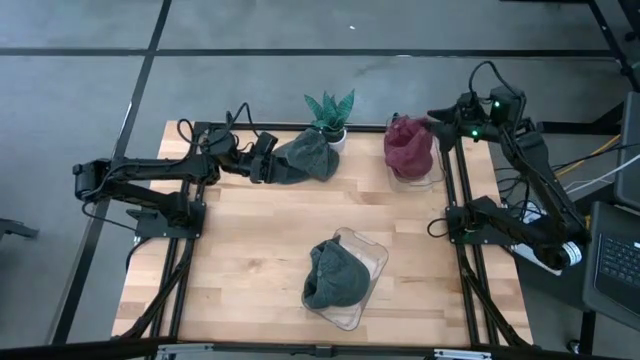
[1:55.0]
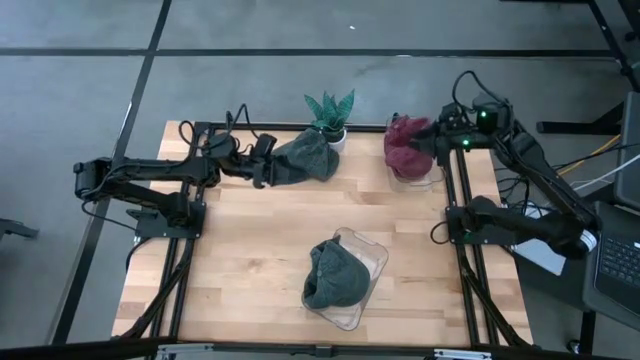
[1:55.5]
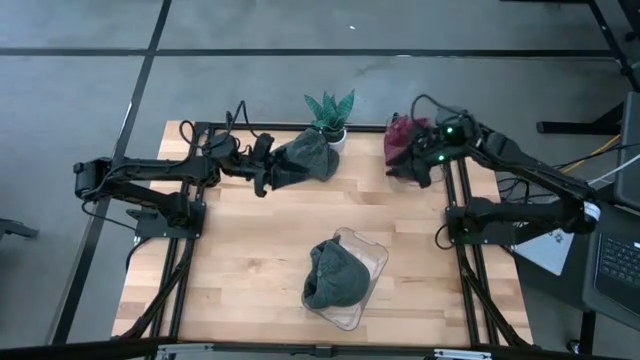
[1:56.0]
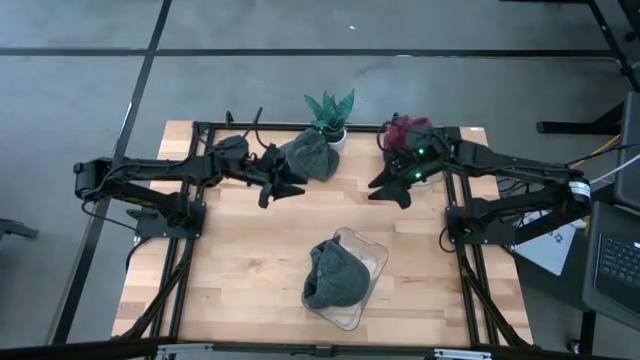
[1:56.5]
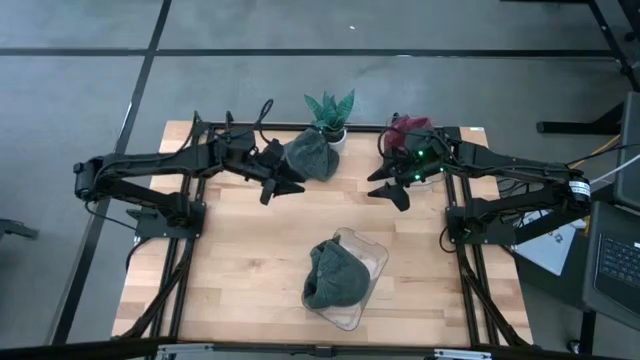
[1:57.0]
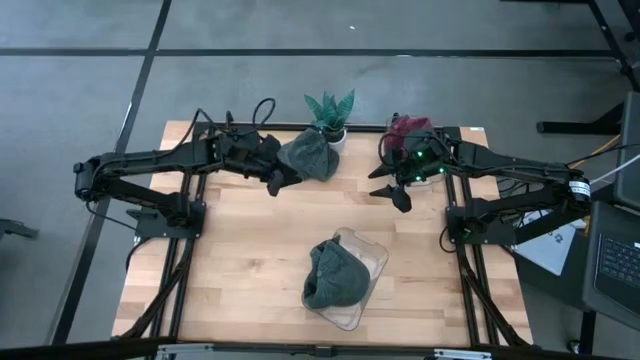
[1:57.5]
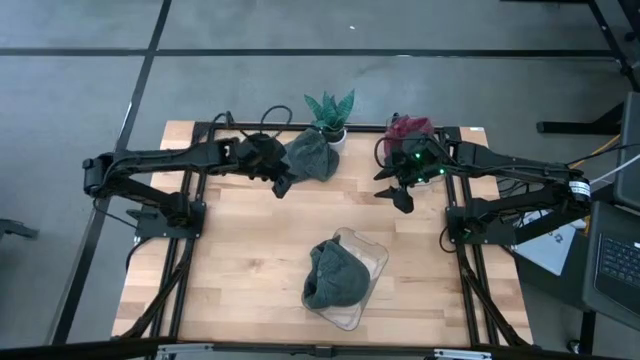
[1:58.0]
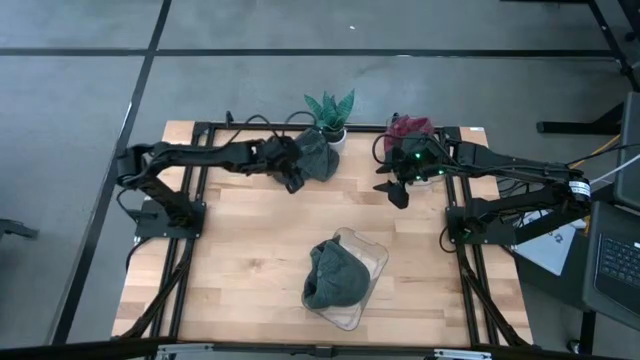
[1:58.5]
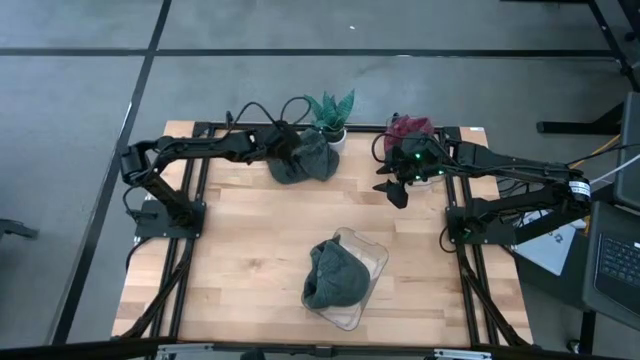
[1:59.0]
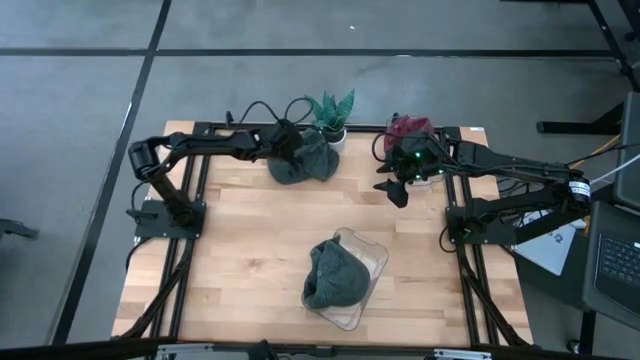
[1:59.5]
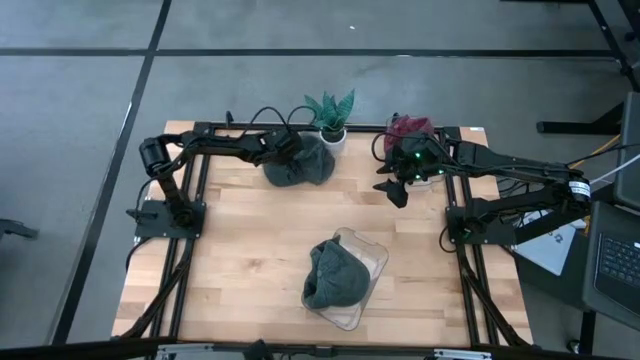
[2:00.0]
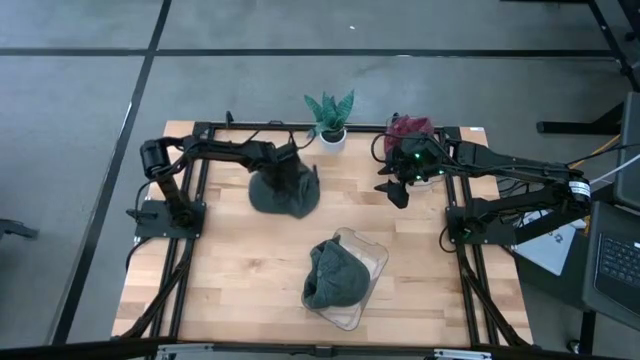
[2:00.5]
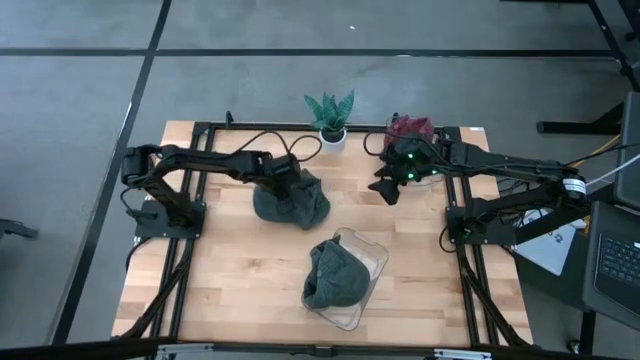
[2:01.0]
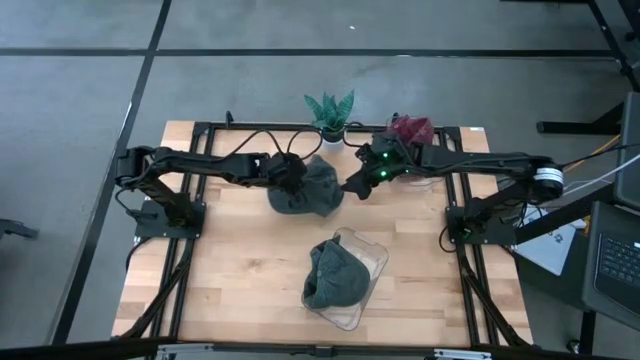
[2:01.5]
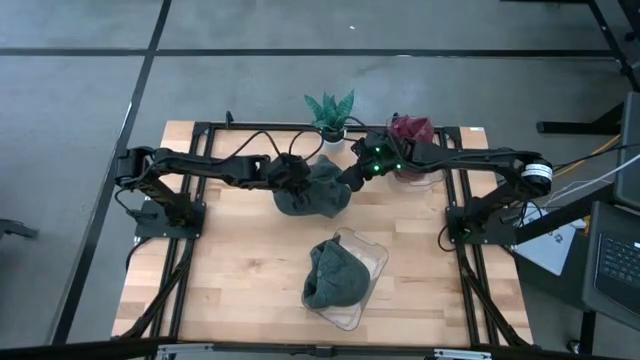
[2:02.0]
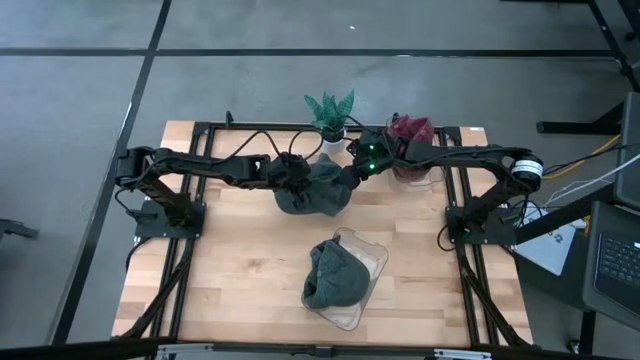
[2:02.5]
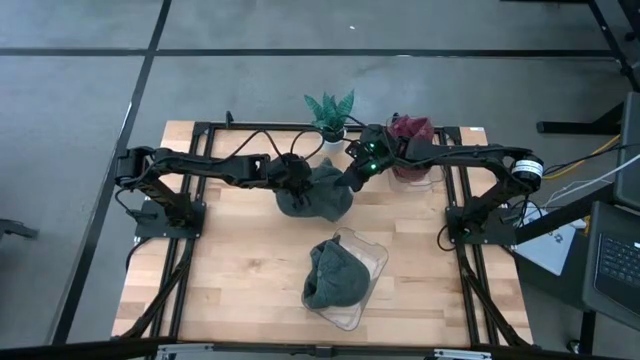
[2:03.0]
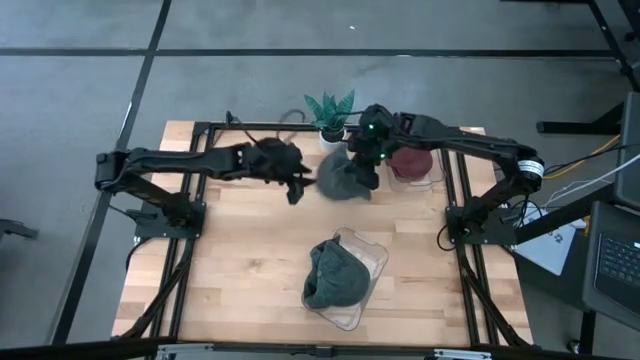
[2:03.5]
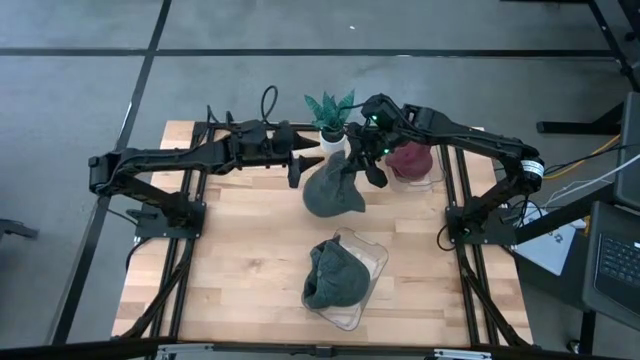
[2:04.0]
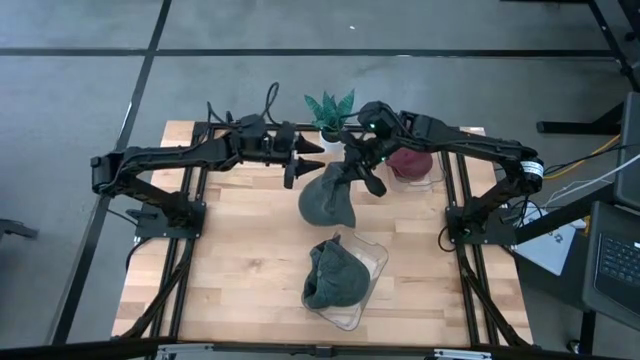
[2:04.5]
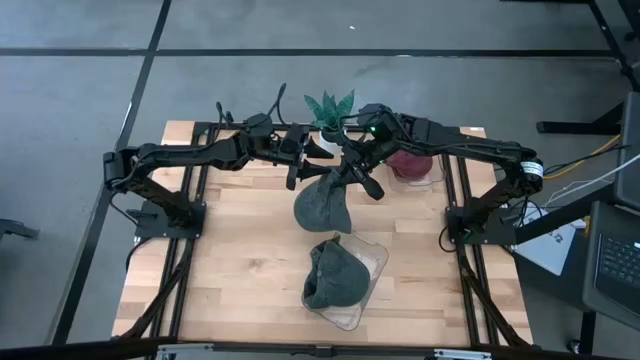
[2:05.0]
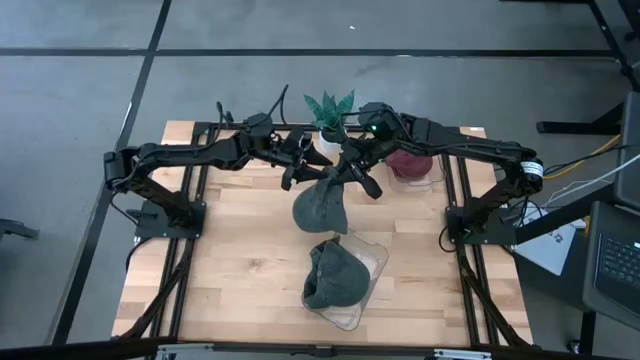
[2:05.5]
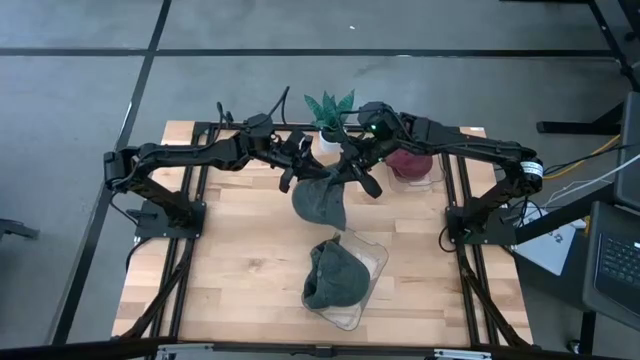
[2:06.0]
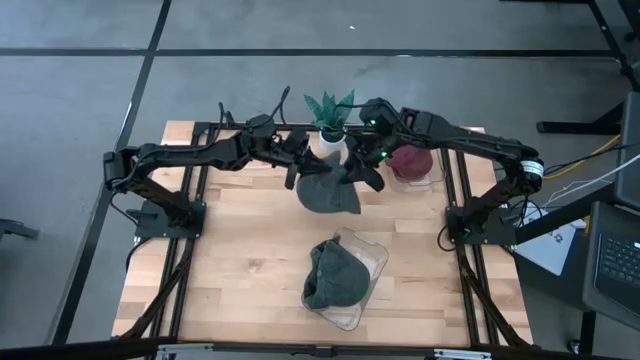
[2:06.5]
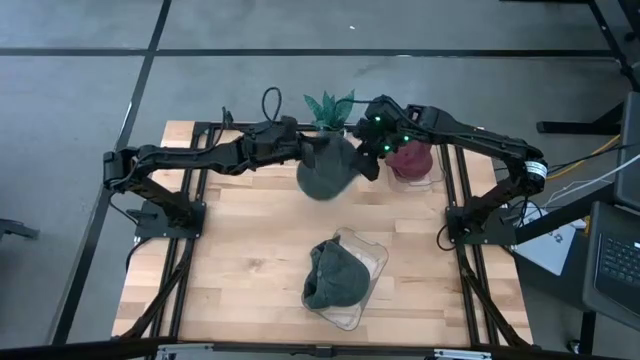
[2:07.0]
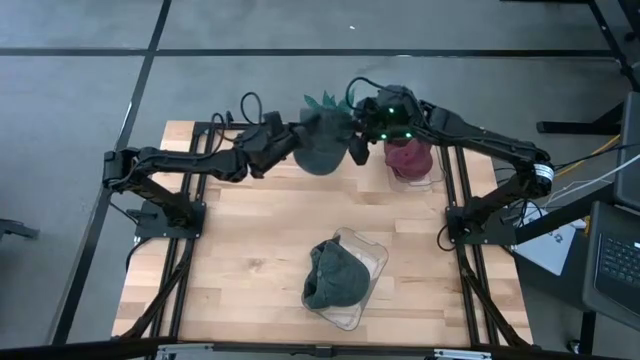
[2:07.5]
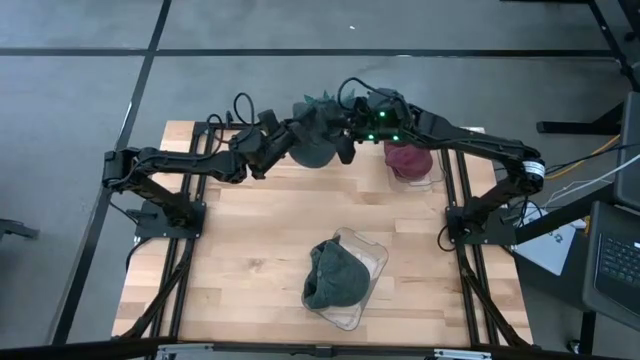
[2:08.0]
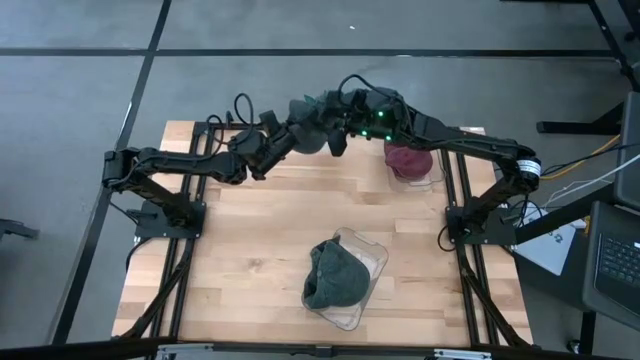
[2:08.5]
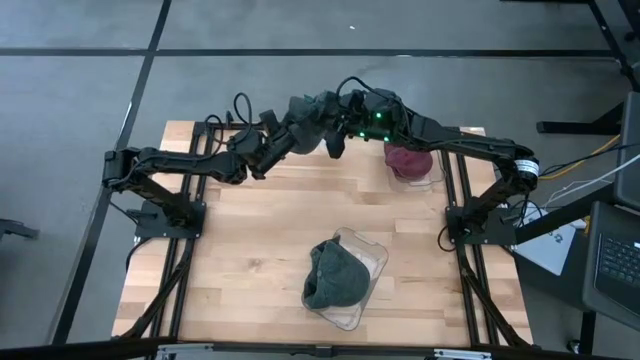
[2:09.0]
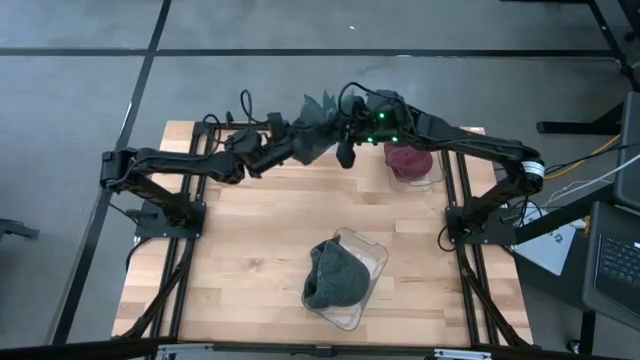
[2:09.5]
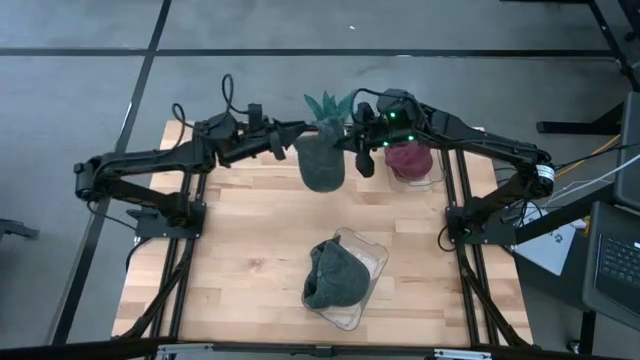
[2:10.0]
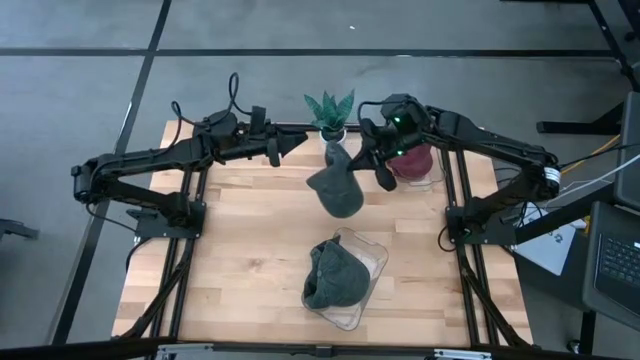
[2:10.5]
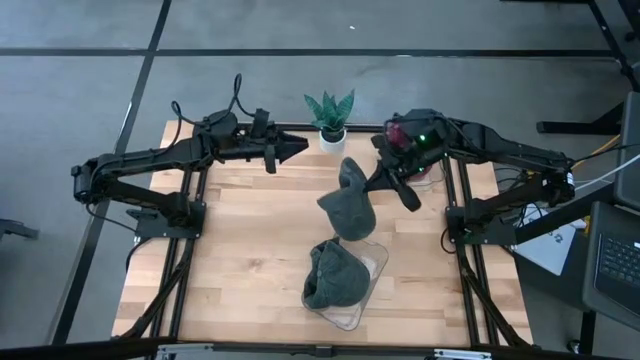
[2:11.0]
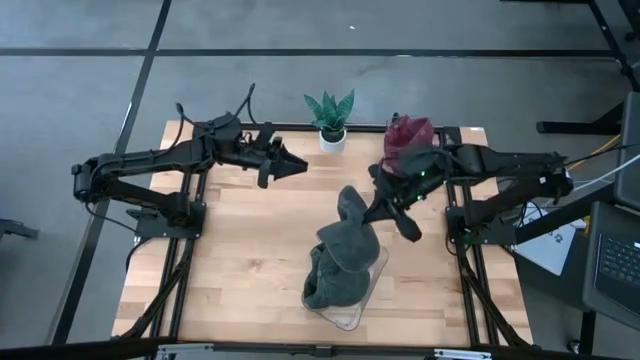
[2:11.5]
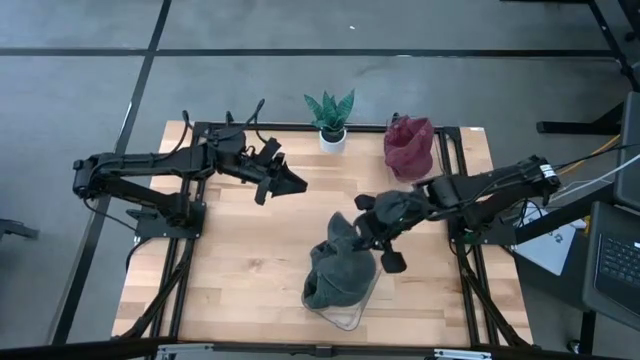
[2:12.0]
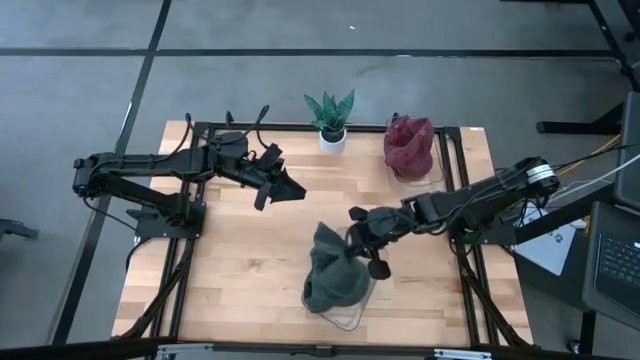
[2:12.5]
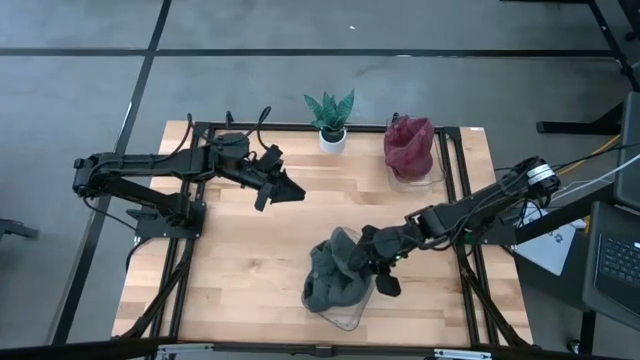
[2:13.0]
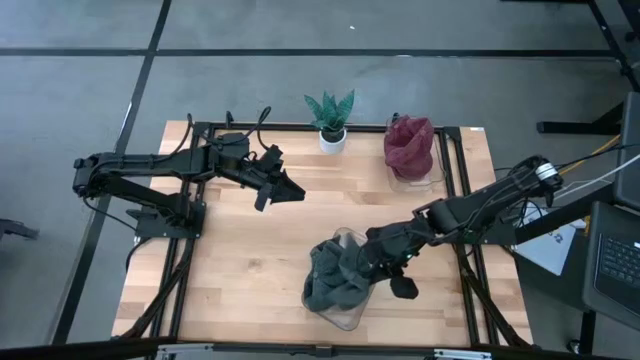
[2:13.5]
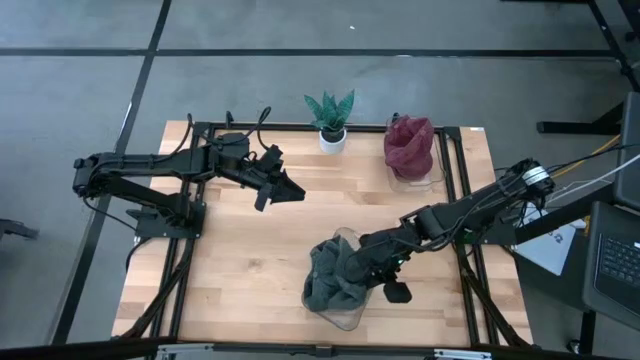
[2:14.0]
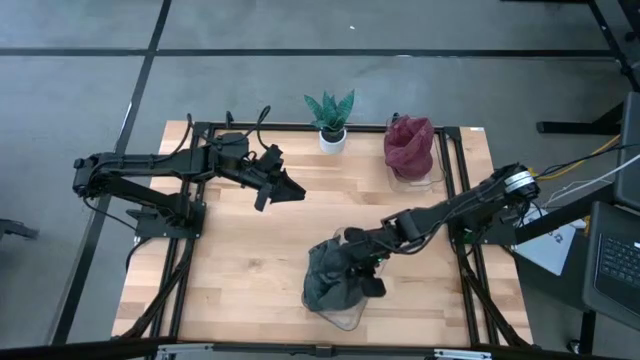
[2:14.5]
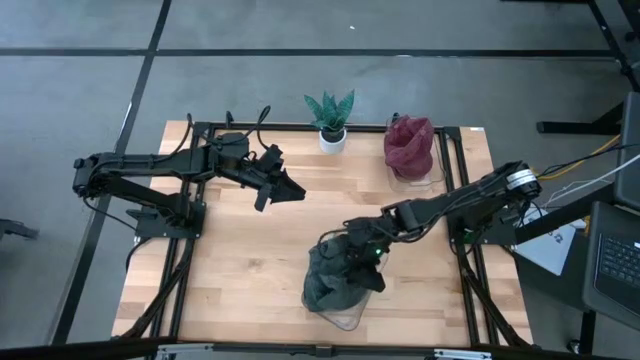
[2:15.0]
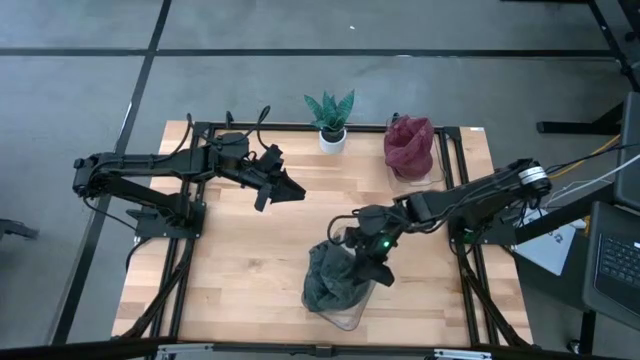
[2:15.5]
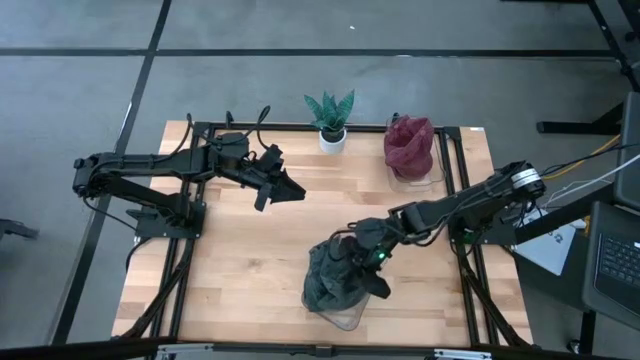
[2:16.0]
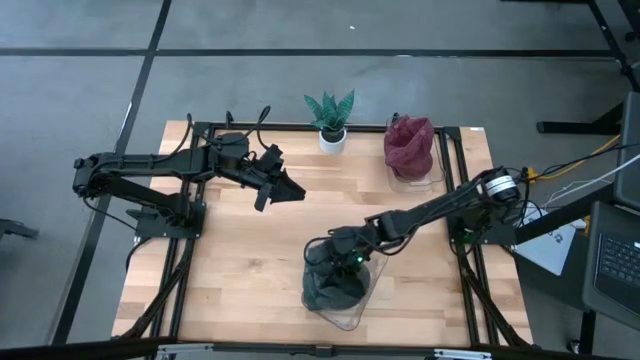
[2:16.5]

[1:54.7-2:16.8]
Task: Pick & Place hat
Put the gray cap into the bottom middle transparent bin
